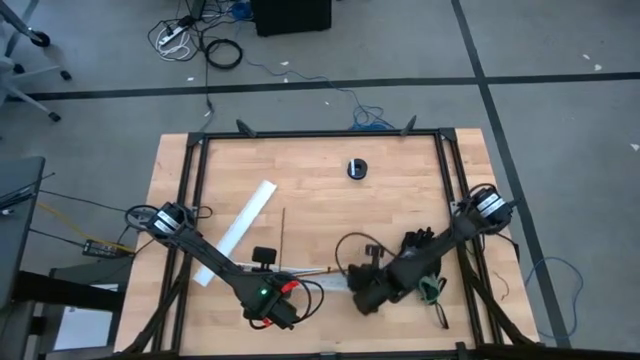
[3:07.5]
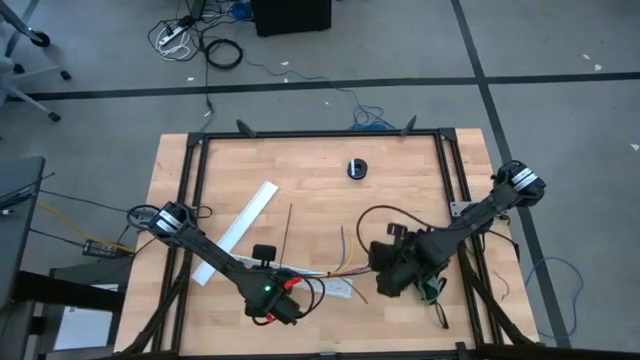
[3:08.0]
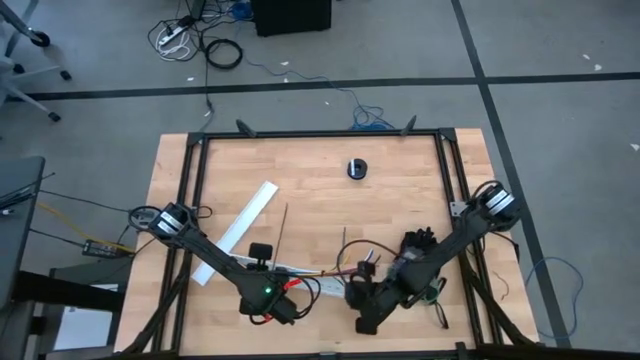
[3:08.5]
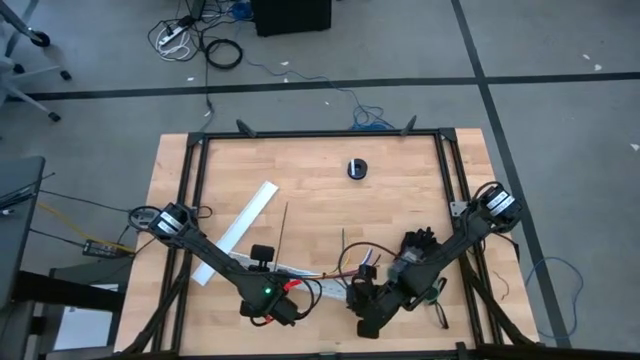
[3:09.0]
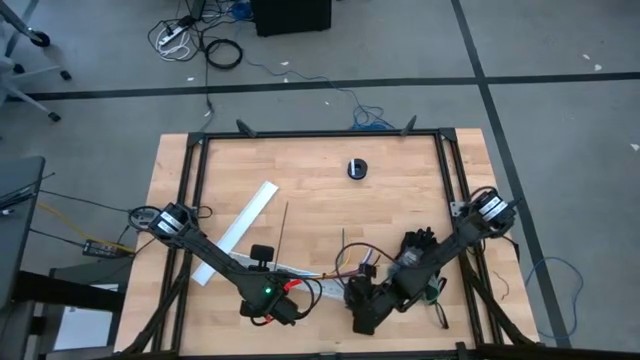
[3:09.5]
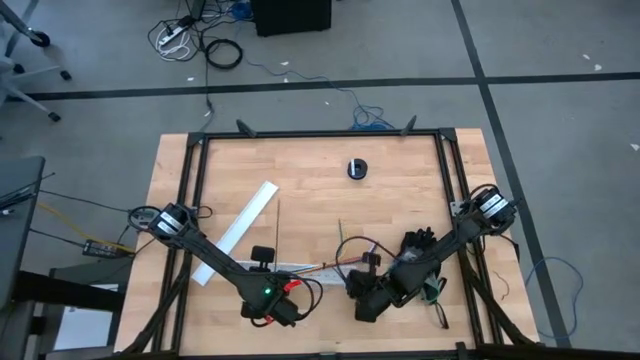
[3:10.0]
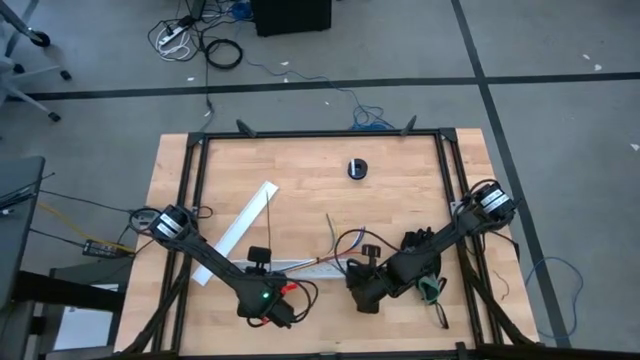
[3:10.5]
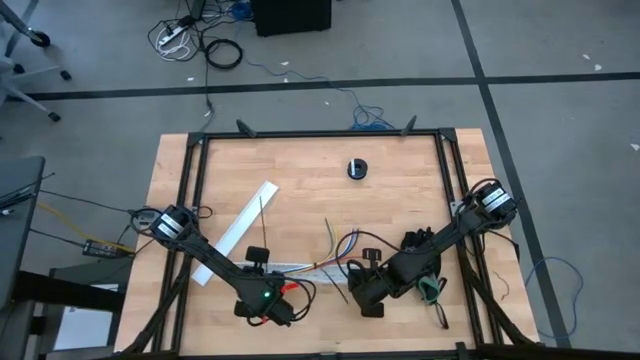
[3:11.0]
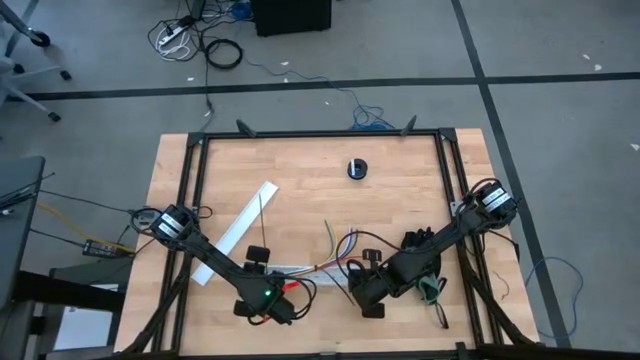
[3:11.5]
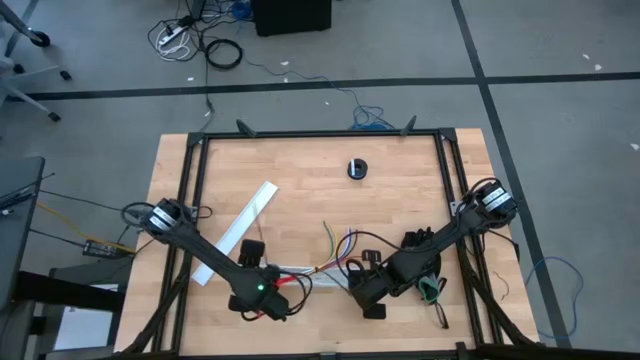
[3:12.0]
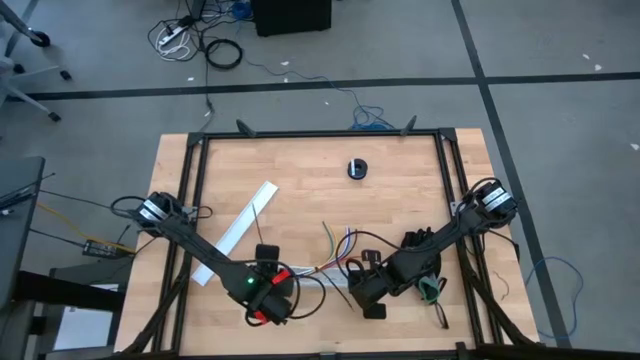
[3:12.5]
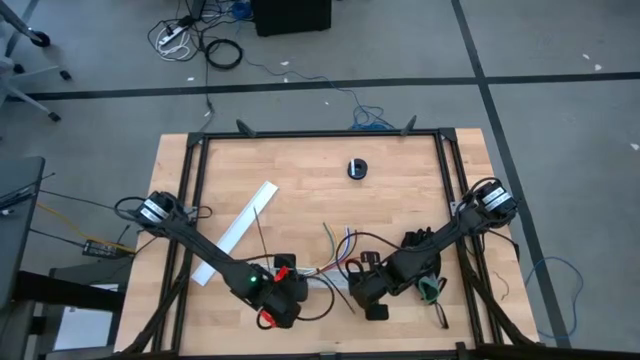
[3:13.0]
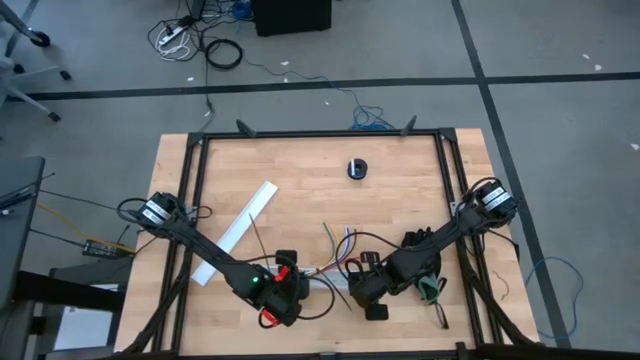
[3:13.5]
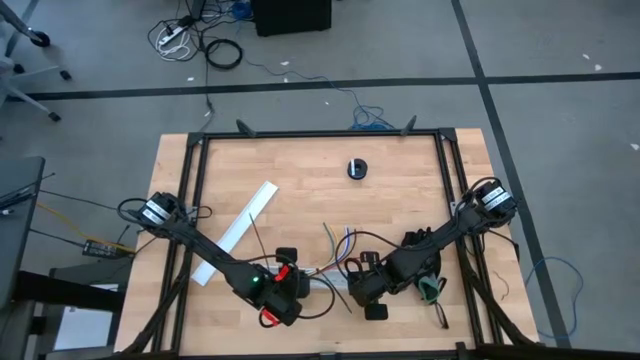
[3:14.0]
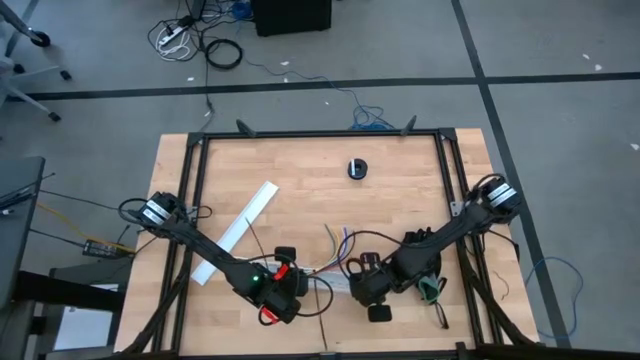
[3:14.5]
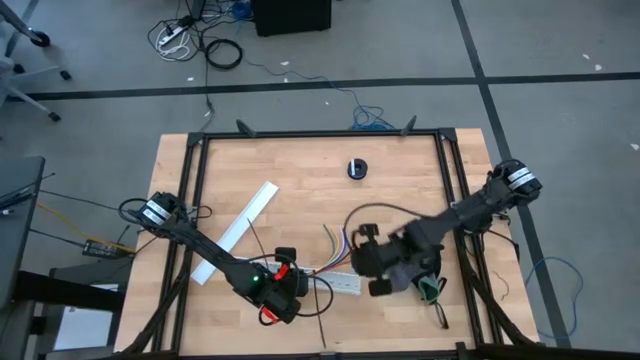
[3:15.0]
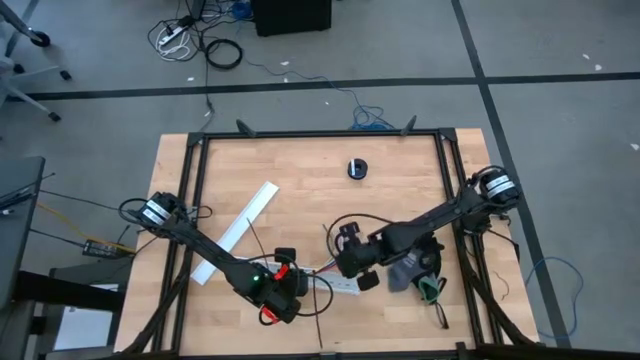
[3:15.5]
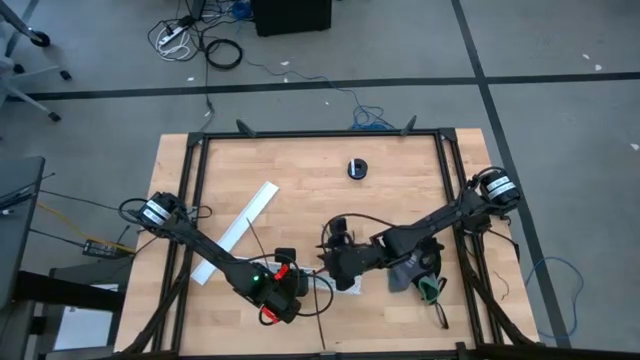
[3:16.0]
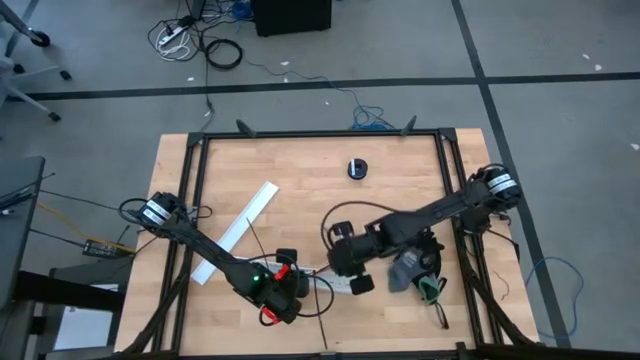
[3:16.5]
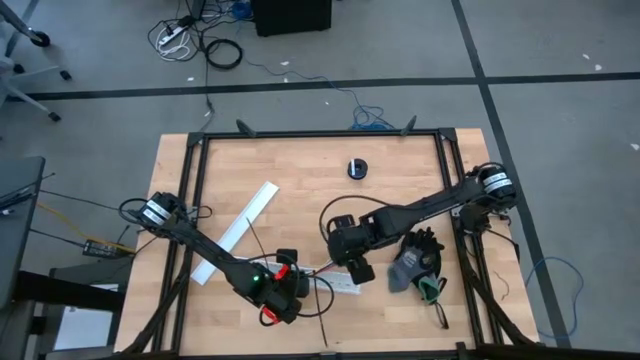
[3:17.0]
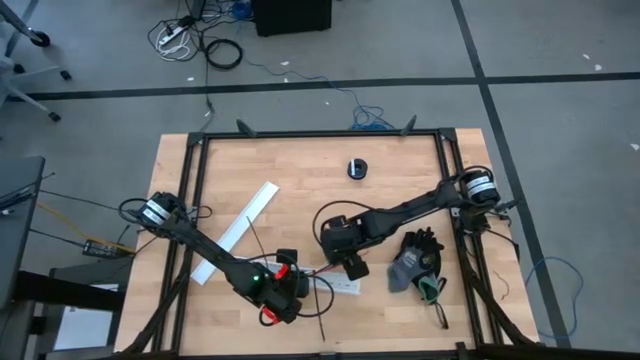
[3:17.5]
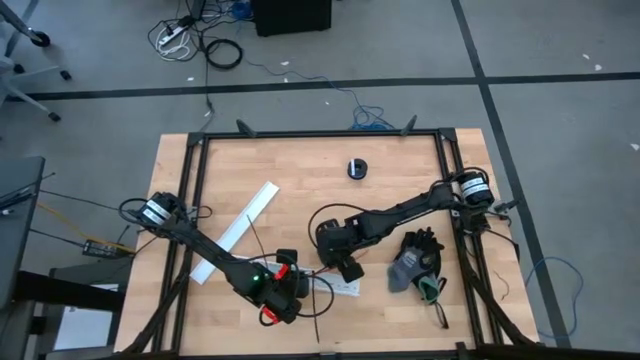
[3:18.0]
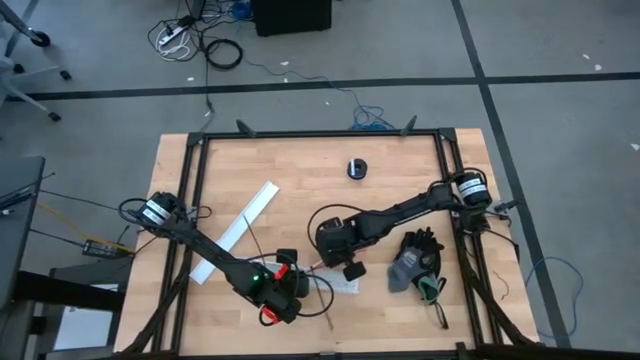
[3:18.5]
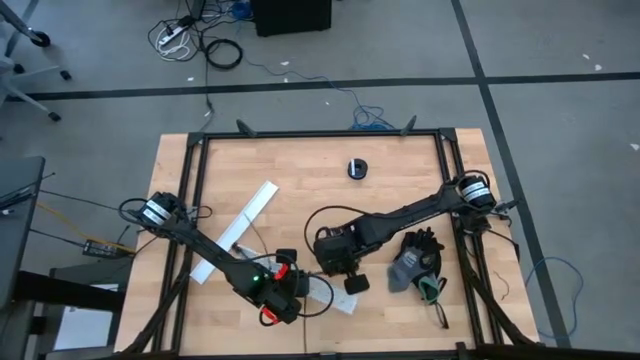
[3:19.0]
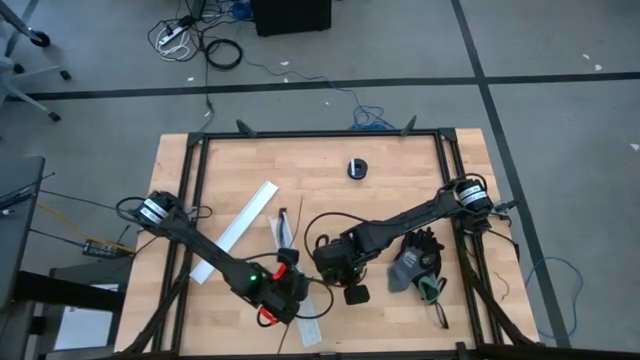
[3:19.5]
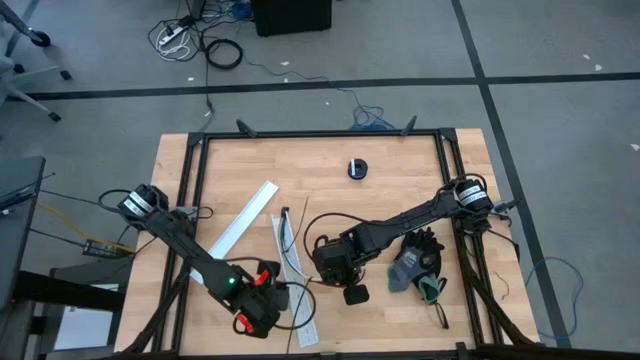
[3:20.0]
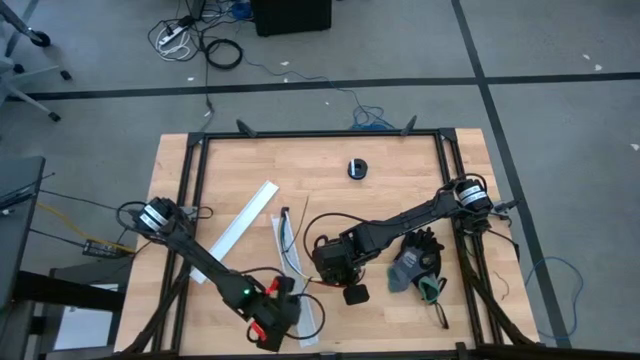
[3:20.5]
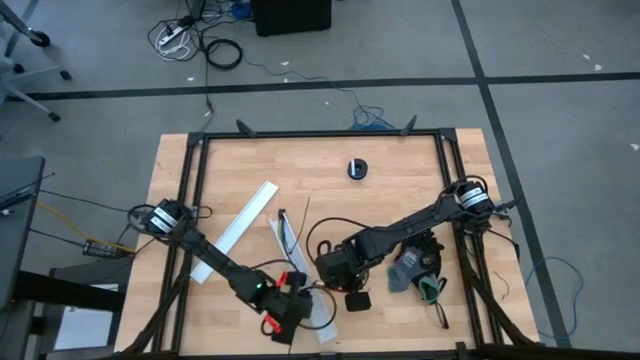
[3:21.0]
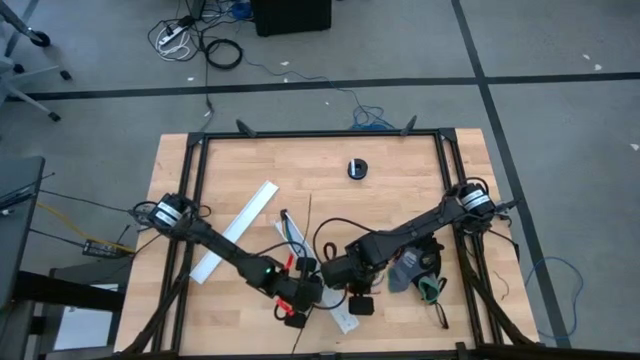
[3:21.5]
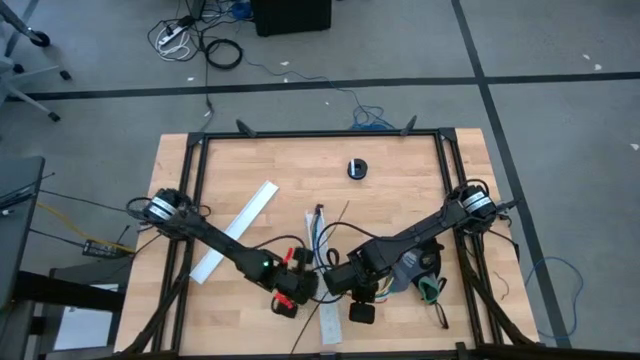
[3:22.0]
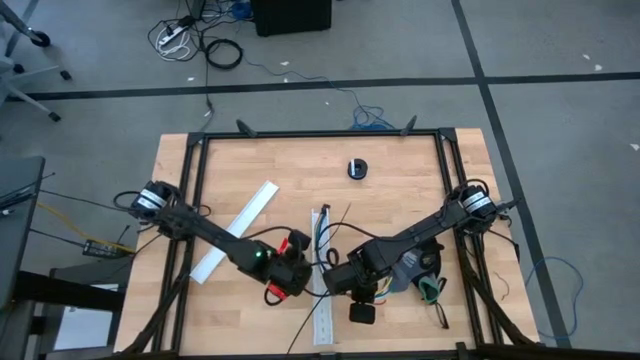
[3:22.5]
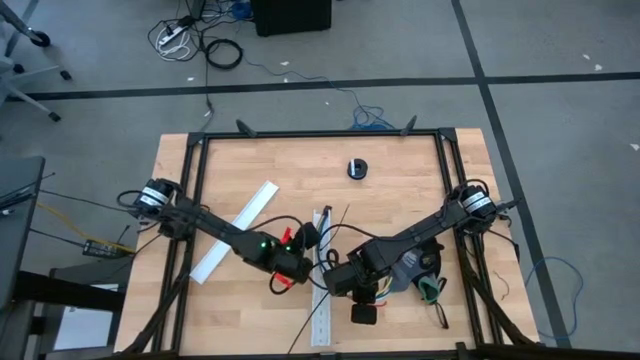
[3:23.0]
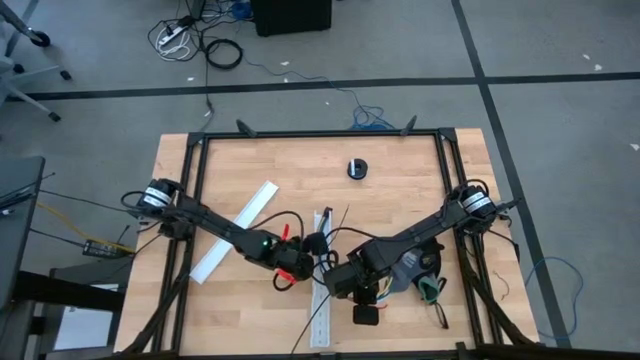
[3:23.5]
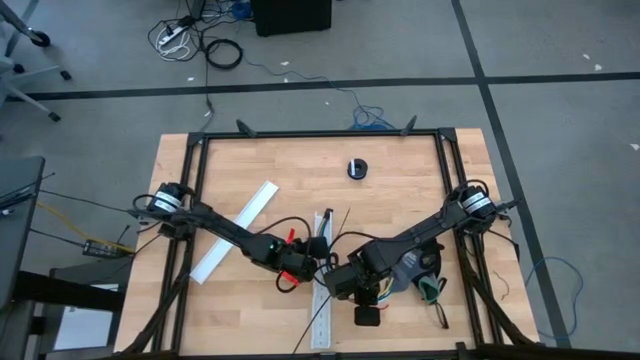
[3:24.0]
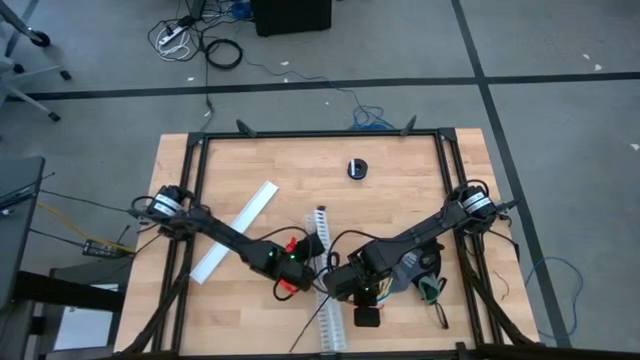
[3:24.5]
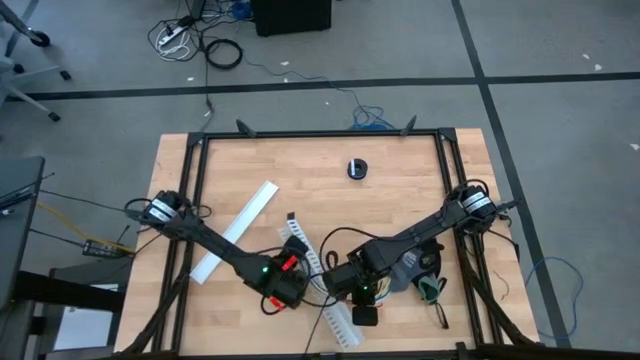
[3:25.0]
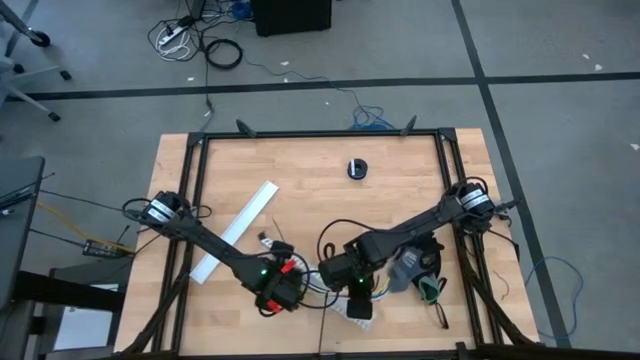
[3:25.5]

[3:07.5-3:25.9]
Task: Ziptie cables
Put the cable wires in the white cable duct

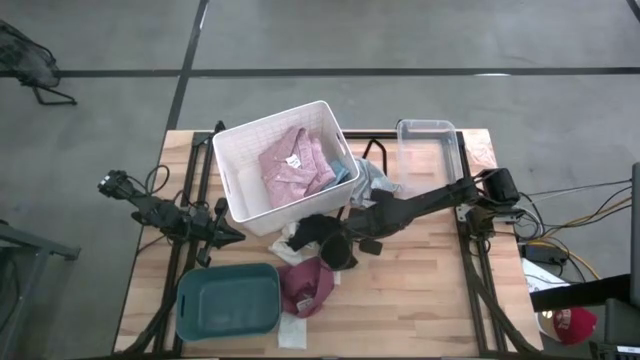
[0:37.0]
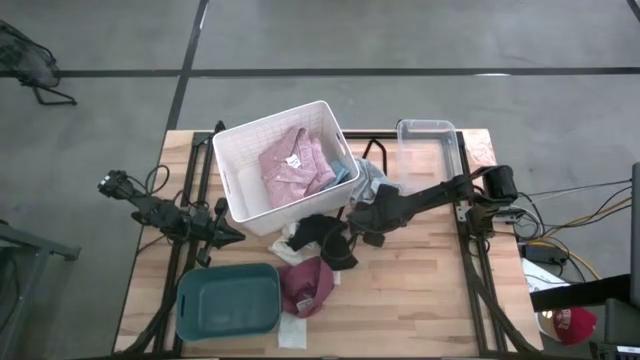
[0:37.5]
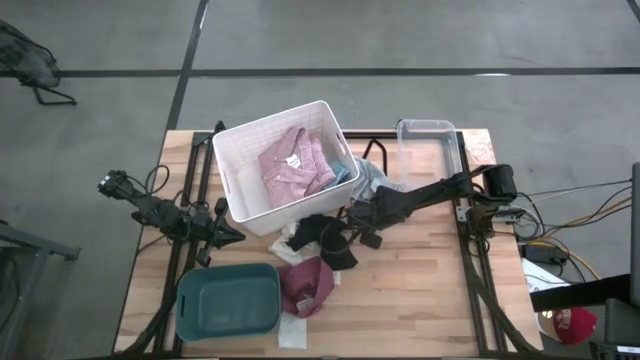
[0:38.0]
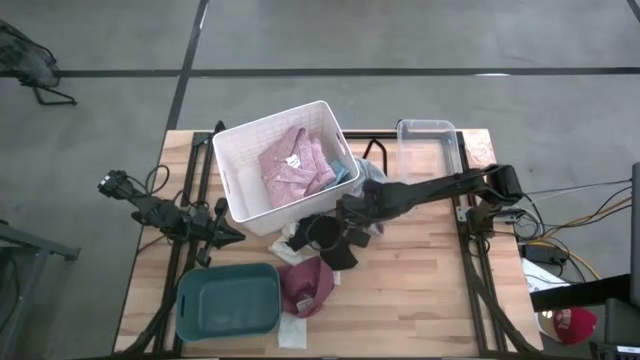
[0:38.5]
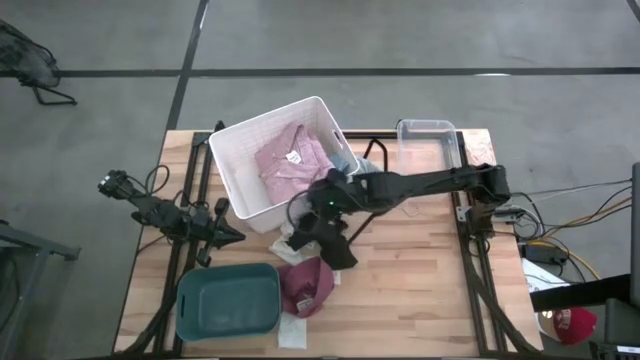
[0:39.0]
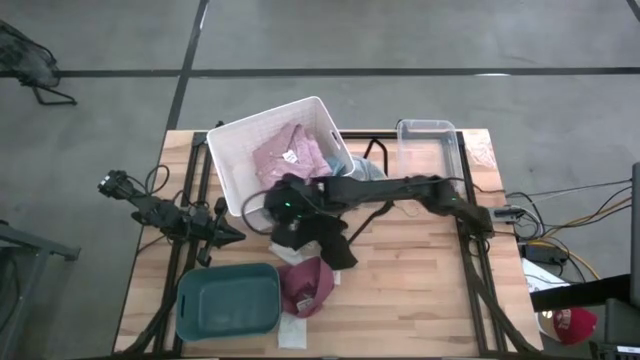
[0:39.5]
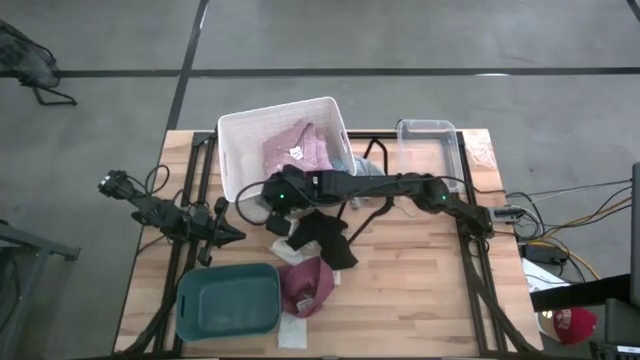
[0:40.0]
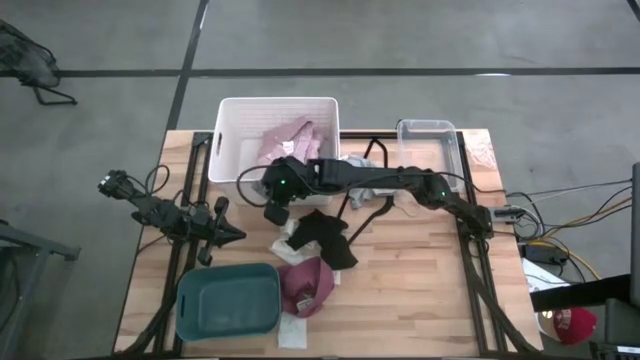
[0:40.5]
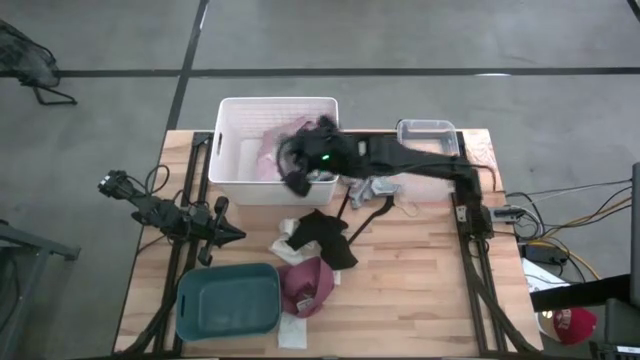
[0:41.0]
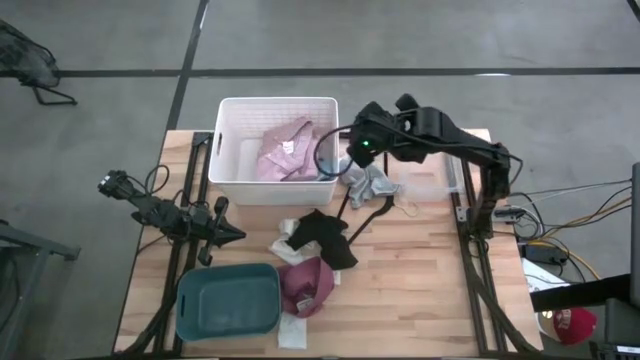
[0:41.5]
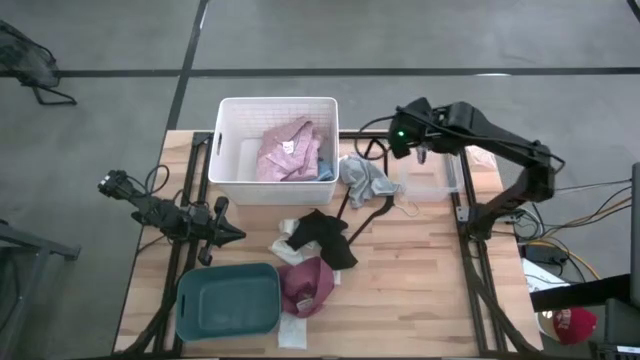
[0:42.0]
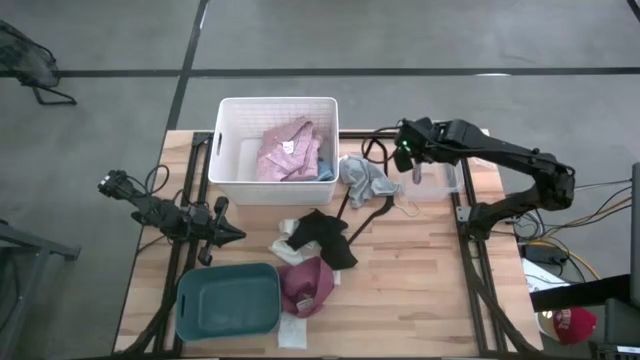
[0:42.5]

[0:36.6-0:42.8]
Task: Pick & Place Cloths
Put the striped sock into the transparent bin
